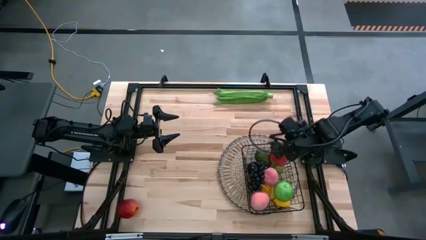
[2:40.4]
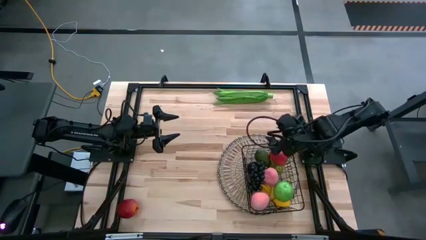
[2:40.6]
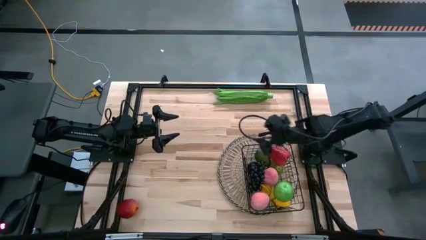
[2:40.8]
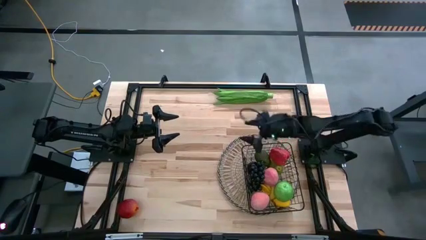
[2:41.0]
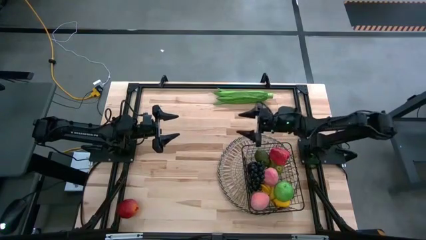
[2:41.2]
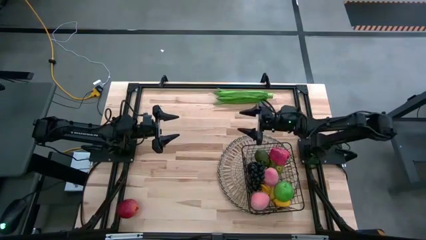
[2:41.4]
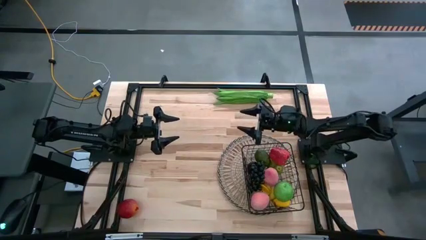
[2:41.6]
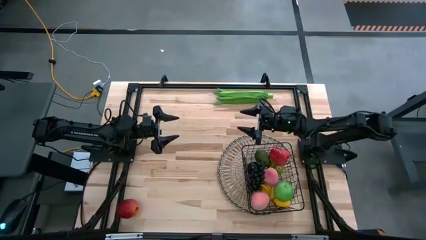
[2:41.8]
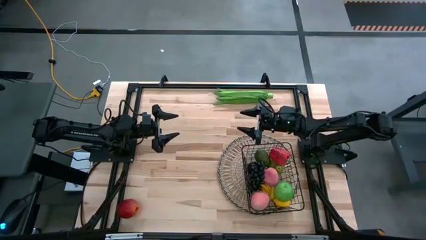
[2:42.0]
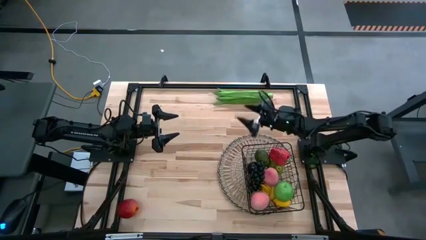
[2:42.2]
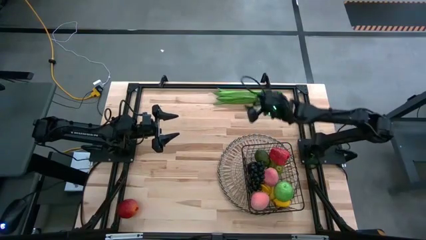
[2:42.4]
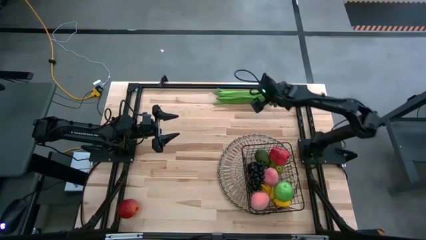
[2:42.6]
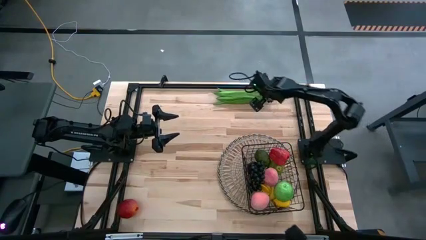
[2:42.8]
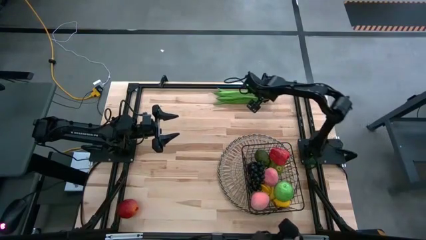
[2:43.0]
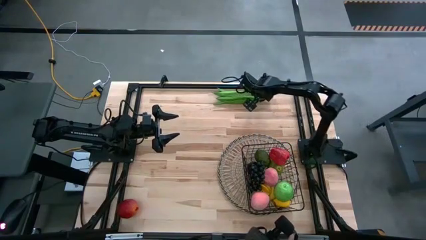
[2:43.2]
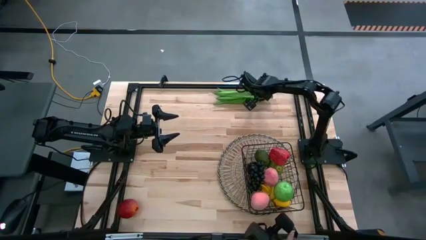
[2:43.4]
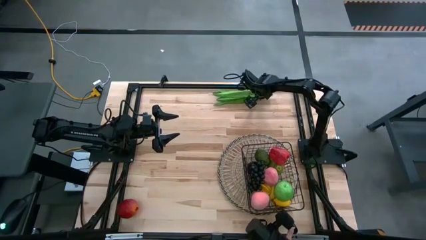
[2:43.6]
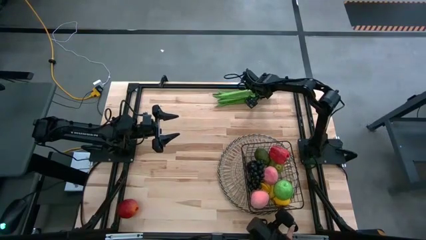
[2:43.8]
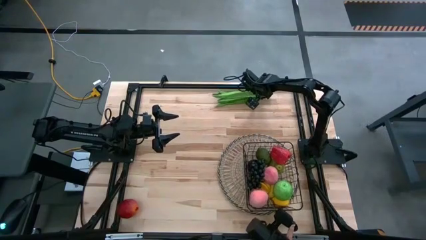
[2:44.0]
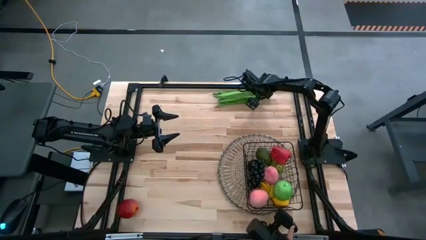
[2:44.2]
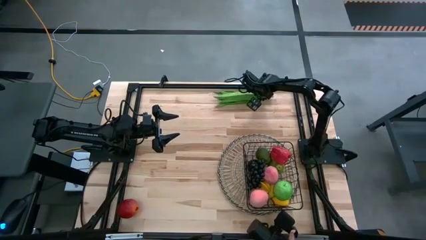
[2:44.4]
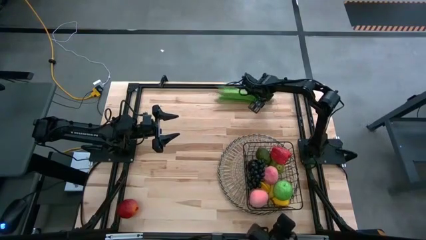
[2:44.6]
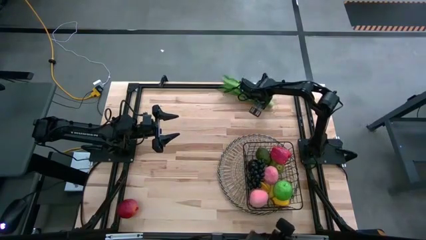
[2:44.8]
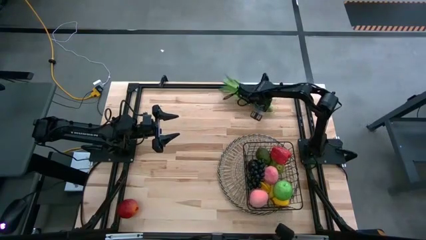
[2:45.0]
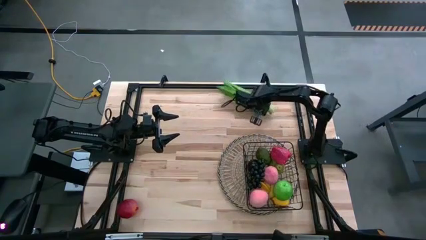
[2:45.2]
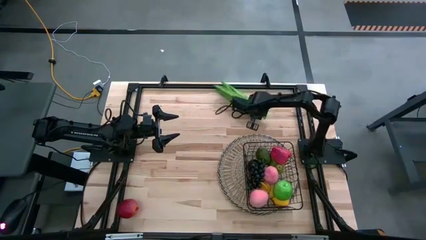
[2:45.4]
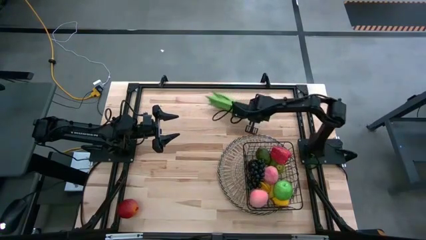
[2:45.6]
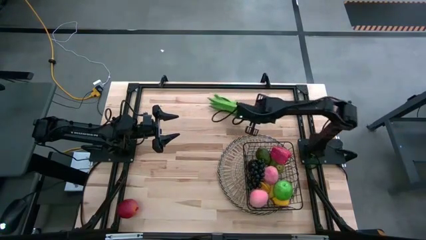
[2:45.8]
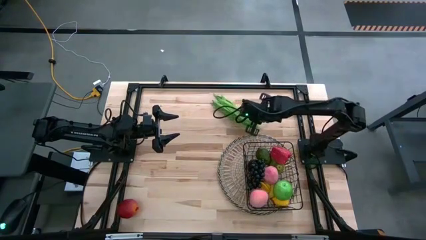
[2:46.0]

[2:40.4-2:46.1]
Task: Build produce basket
Put the lettuce into the wire basket

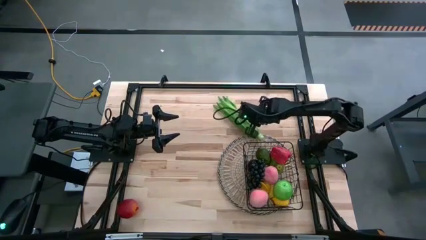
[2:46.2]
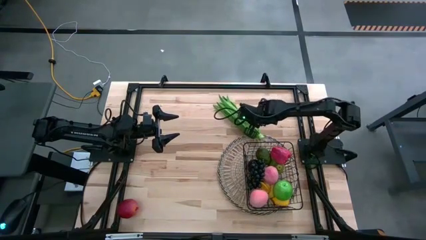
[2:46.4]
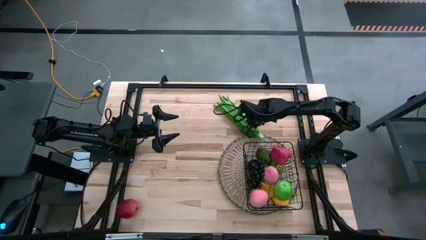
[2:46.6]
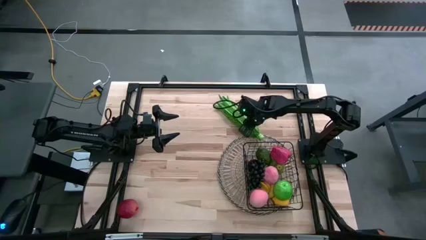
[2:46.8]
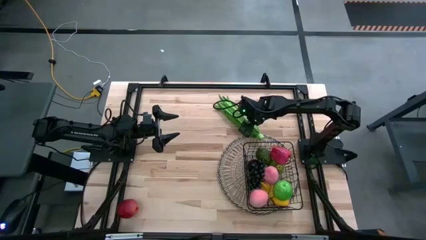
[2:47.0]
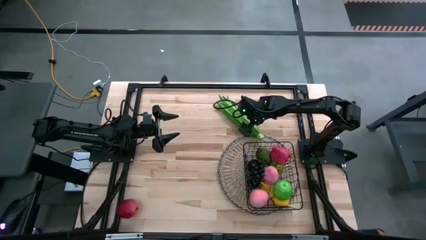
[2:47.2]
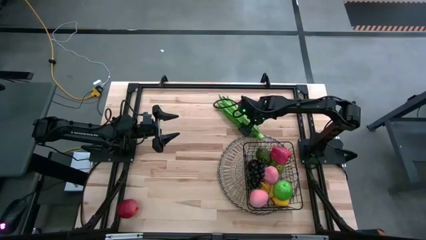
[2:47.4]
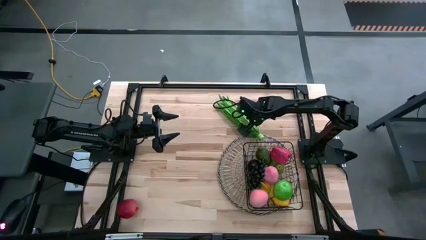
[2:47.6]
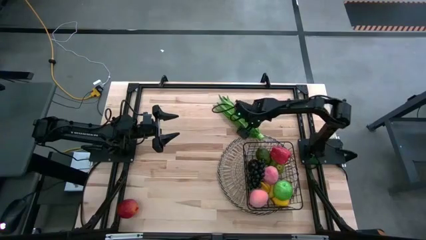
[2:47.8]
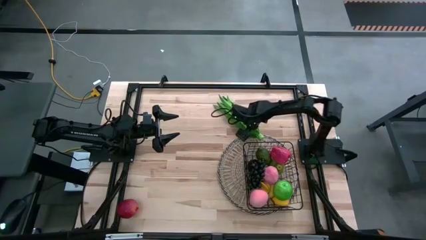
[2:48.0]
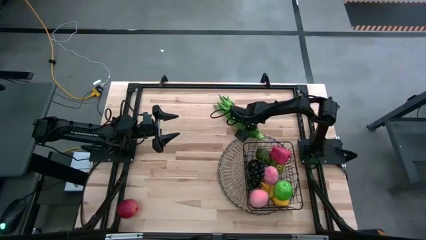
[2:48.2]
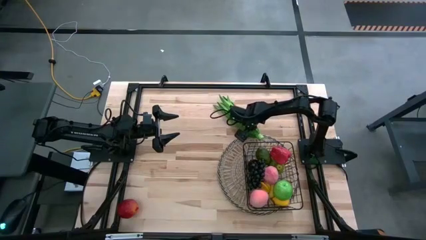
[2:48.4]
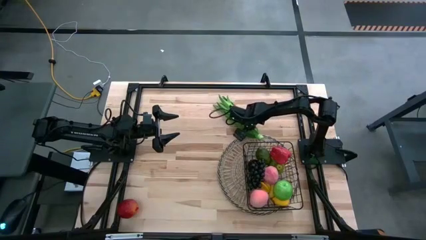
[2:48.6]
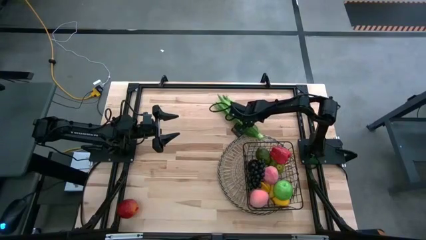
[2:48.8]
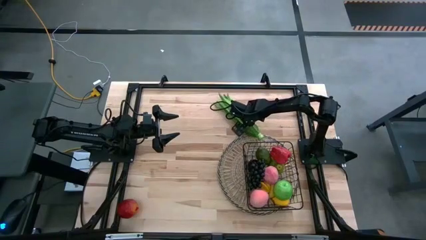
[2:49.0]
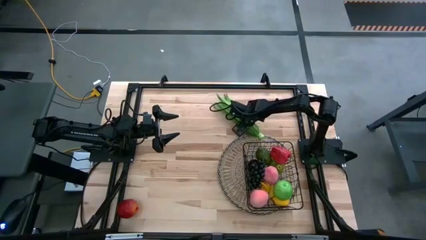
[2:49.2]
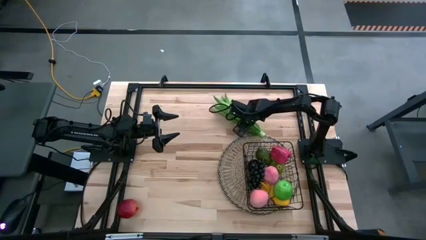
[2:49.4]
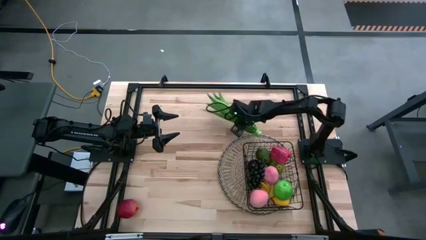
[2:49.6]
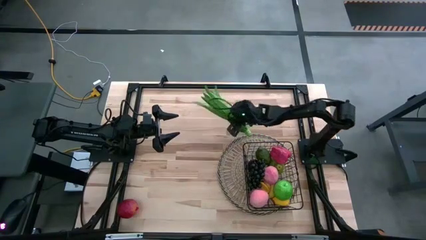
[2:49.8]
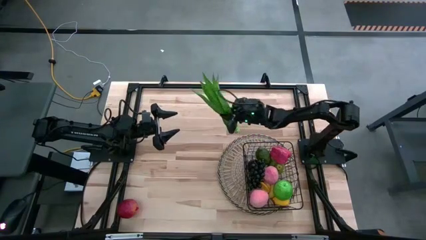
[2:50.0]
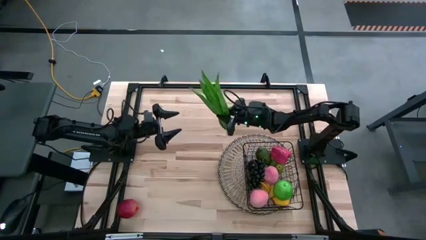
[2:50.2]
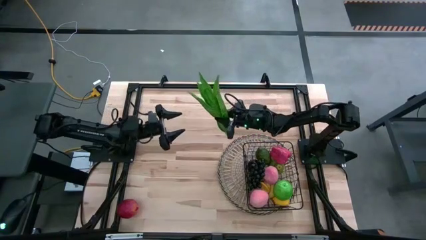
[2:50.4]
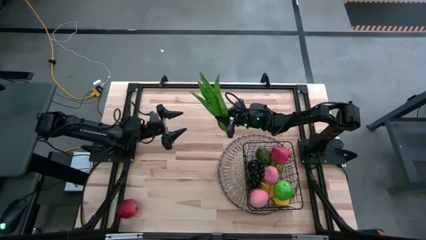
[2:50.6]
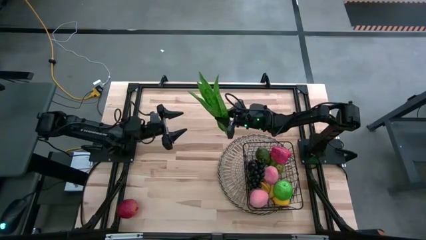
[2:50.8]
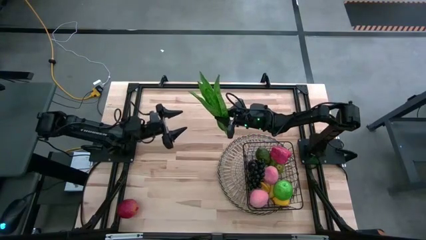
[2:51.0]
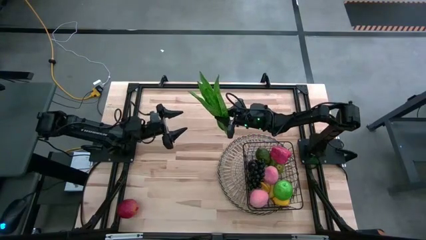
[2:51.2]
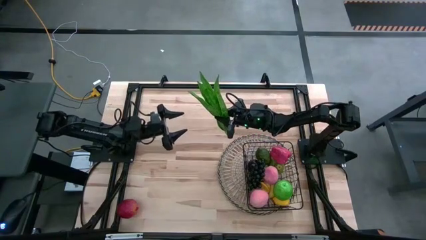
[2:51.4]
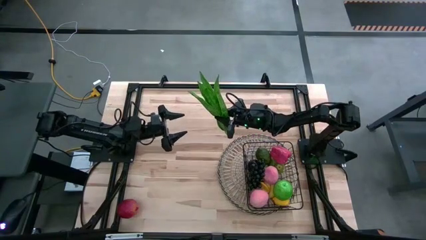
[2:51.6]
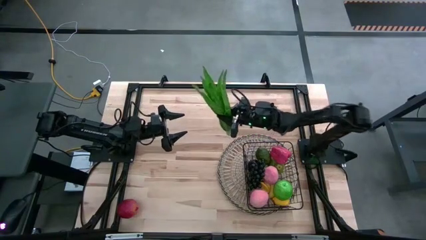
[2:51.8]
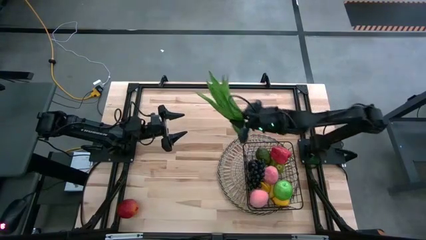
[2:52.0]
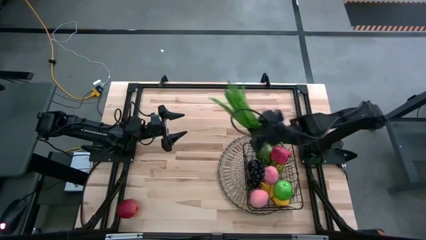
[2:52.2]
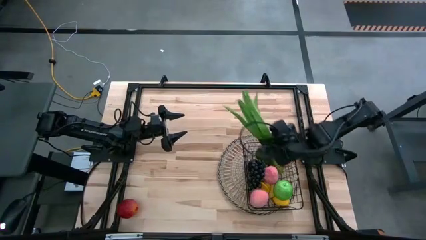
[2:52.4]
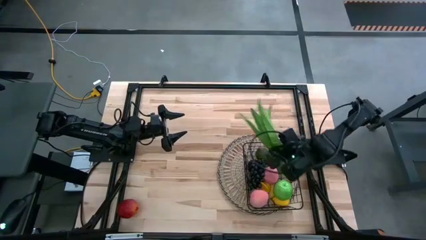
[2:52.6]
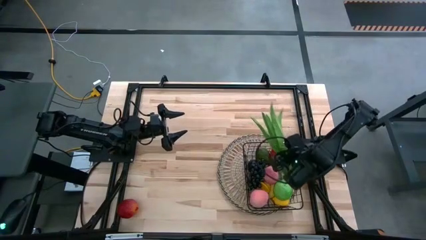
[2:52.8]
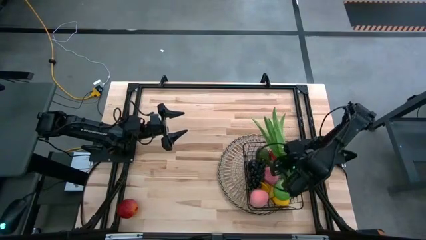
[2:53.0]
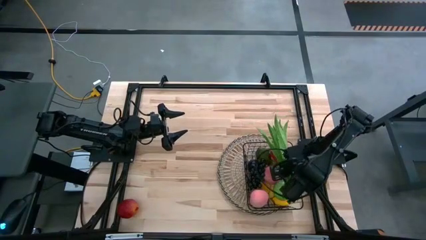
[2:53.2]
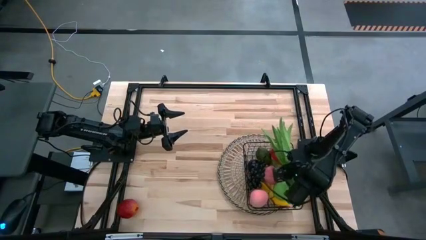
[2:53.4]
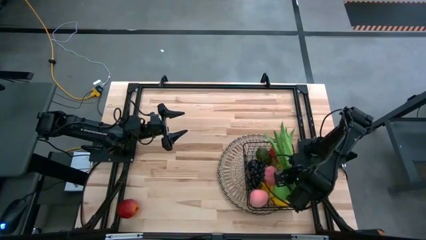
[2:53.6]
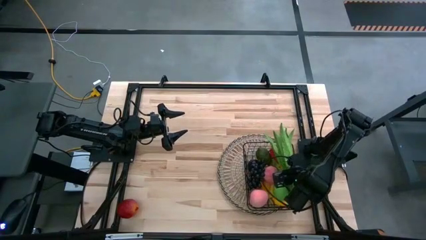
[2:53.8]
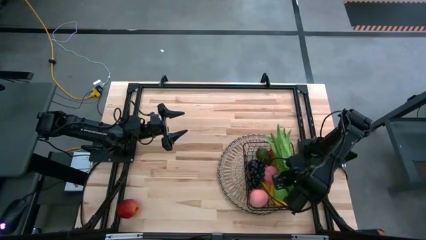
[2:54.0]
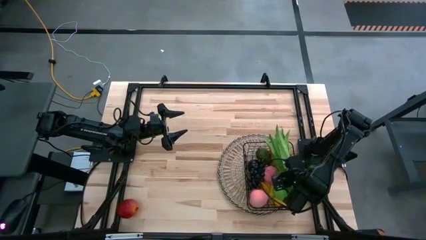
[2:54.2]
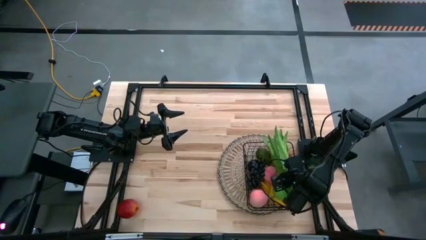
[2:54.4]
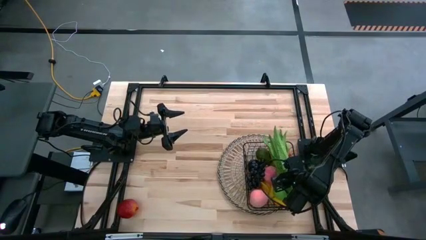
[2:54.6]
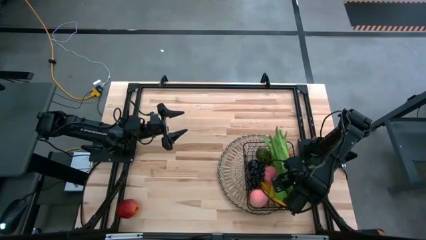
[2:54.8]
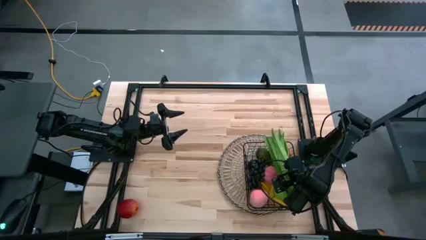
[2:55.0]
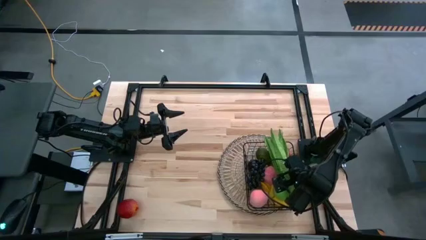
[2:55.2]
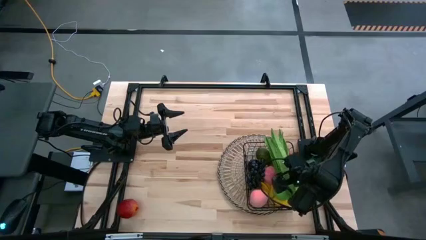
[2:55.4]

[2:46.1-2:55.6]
Put the lettuce into the wire basket
